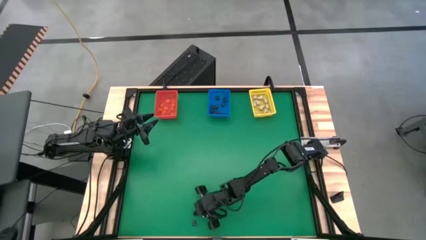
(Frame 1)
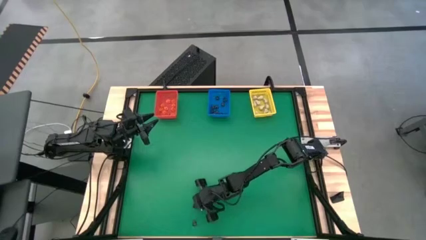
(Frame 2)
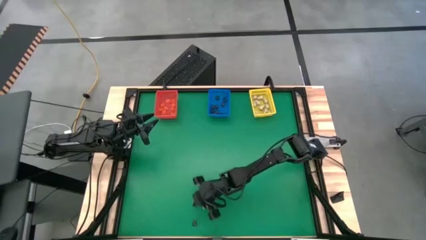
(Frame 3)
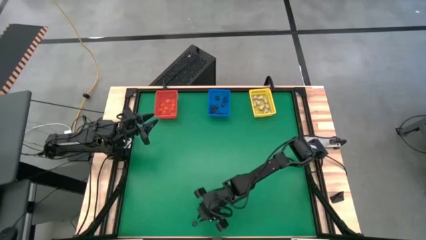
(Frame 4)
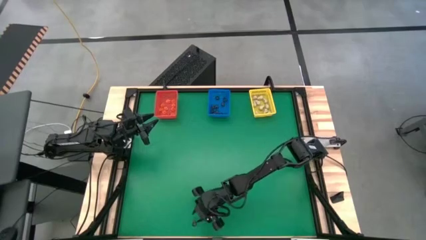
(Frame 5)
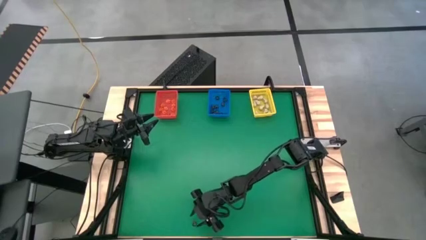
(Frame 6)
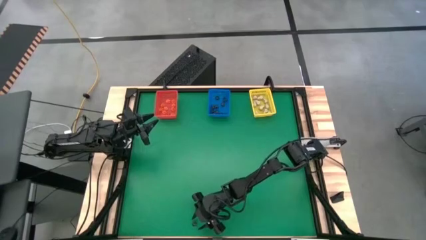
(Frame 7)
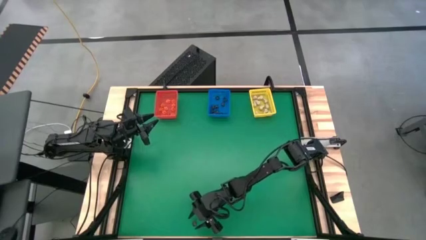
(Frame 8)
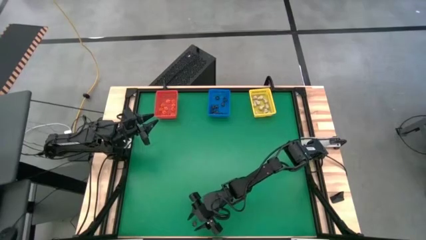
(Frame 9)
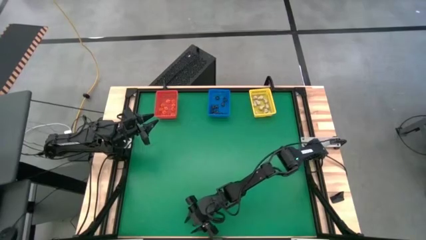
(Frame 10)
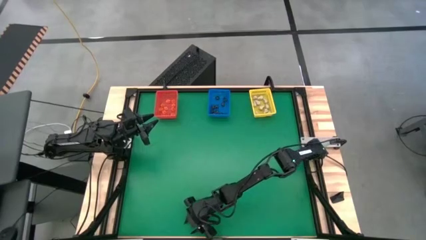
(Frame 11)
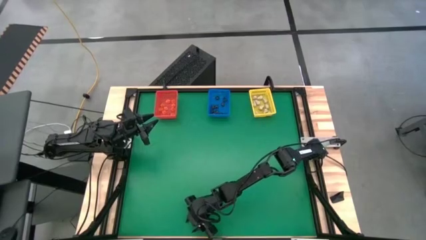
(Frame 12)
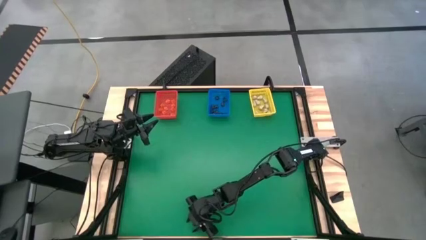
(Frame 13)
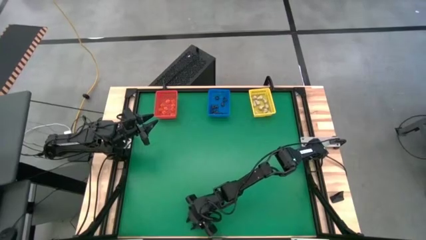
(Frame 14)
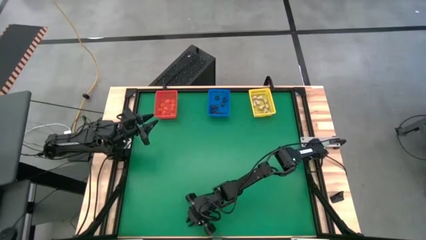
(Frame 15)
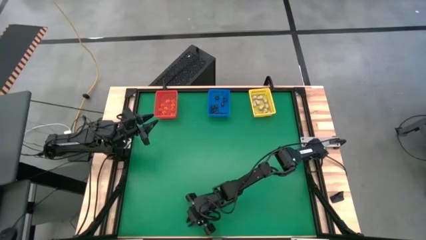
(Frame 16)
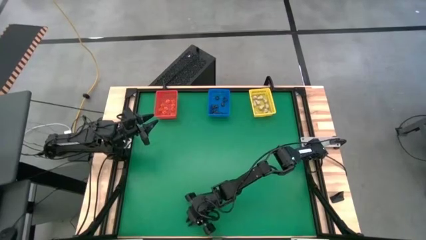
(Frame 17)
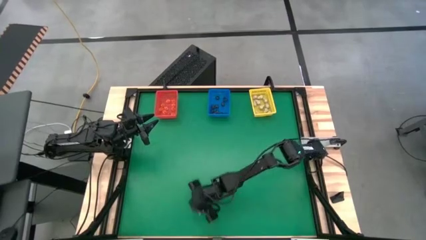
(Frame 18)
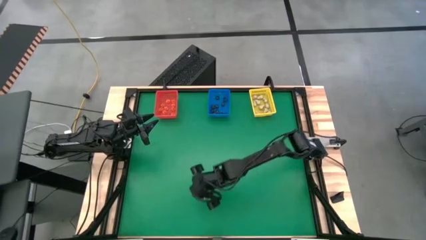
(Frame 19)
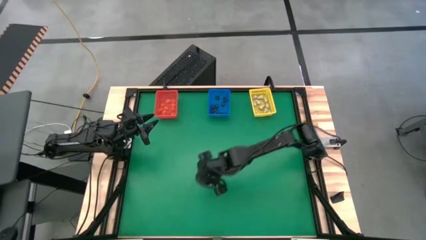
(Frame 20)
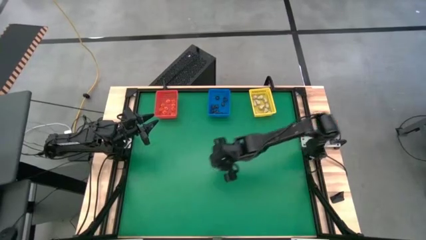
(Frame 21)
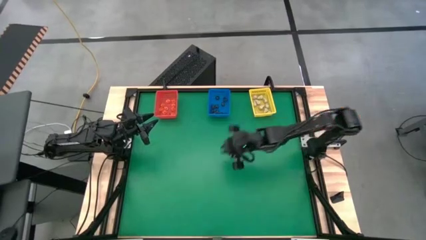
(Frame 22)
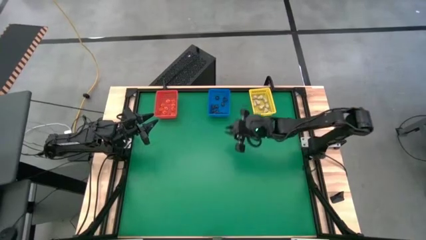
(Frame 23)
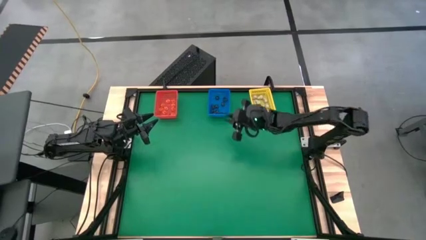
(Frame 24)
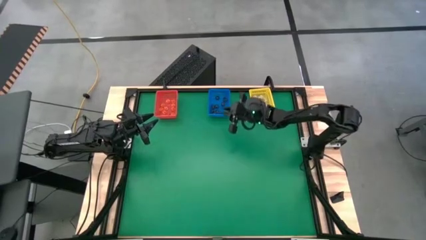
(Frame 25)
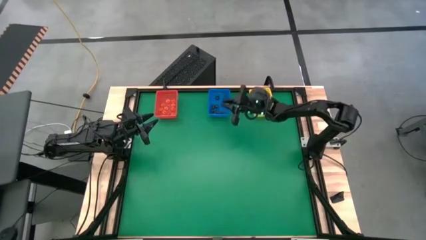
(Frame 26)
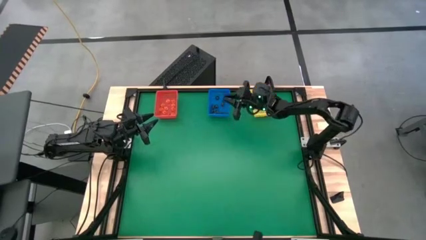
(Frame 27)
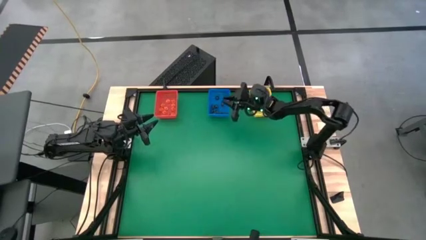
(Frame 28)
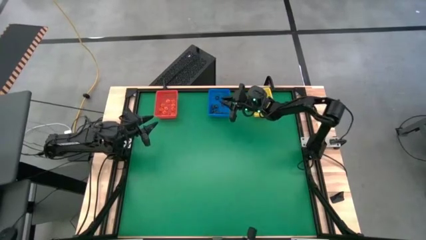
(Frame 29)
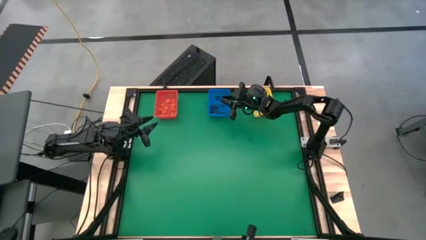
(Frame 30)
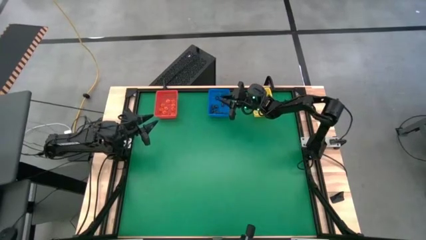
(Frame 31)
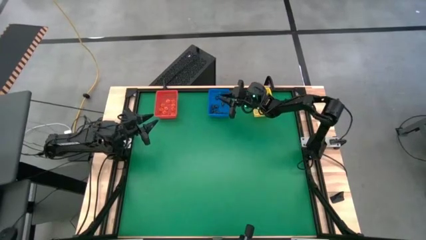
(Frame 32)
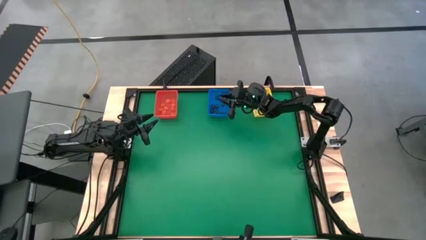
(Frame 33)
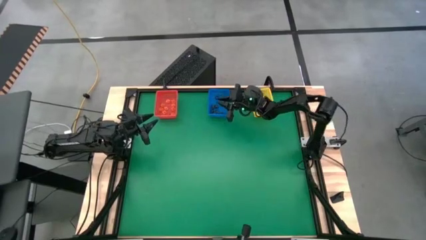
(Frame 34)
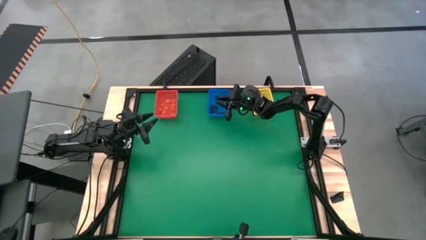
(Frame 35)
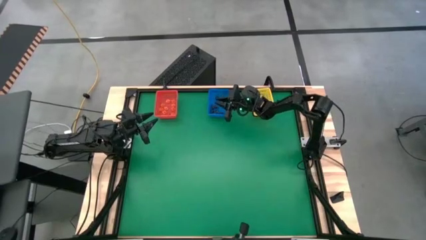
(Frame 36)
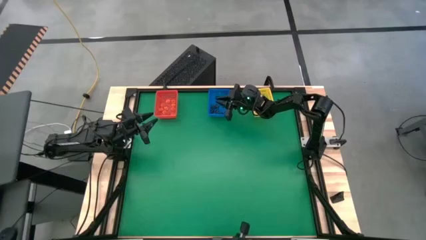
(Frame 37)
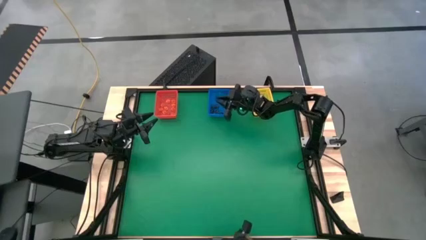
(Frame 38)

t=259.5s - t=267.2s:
Task: Sort Halloween decoration
Put the black skull toy into the blue bin

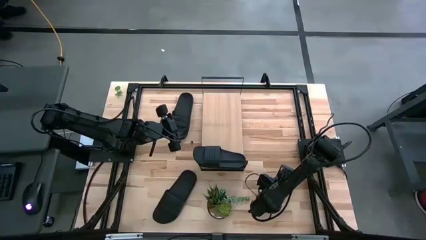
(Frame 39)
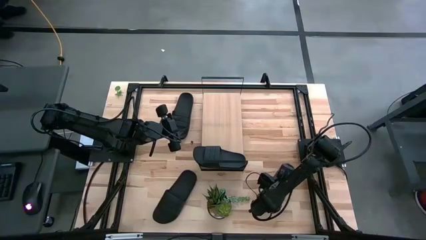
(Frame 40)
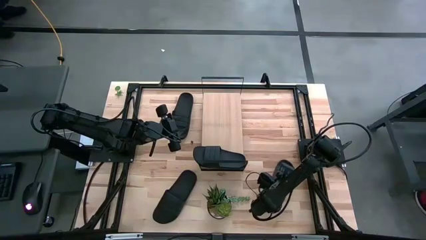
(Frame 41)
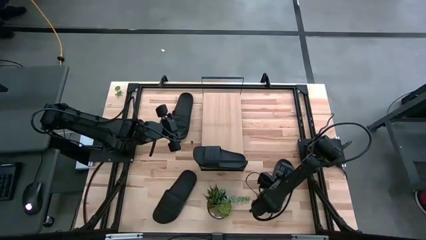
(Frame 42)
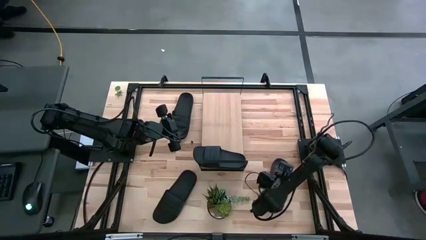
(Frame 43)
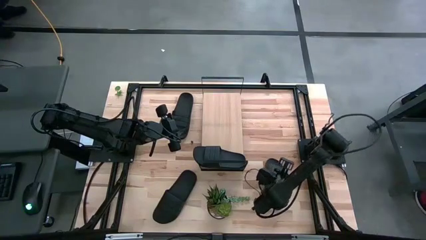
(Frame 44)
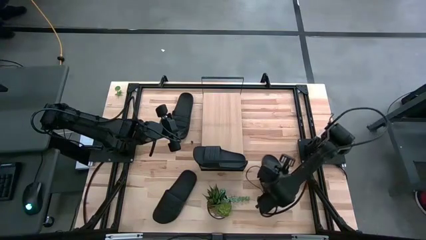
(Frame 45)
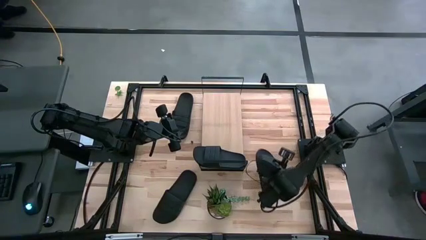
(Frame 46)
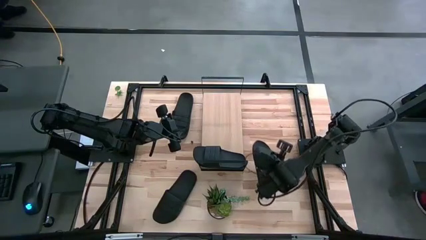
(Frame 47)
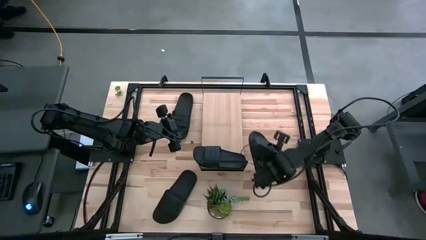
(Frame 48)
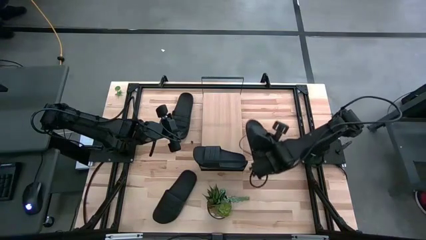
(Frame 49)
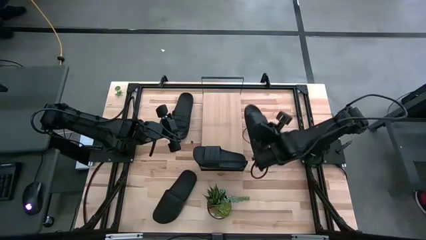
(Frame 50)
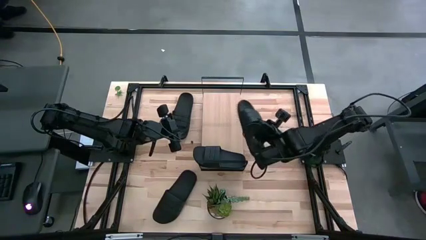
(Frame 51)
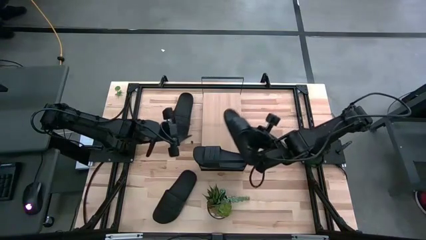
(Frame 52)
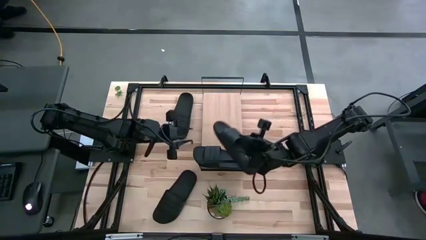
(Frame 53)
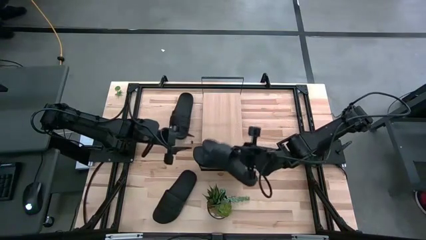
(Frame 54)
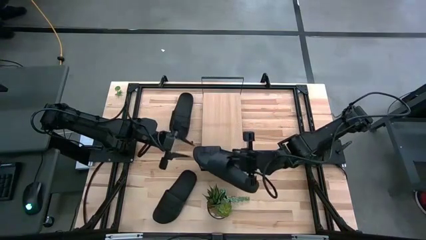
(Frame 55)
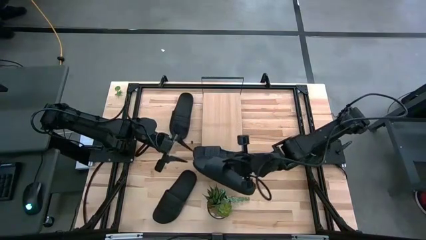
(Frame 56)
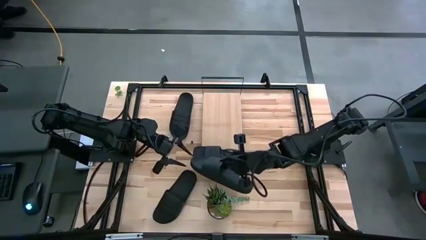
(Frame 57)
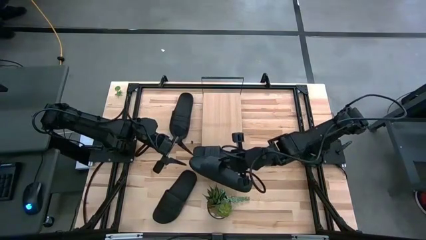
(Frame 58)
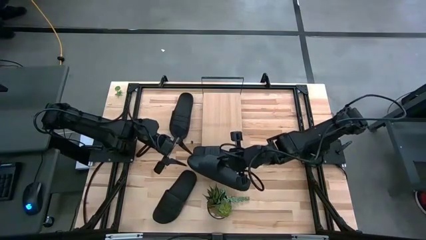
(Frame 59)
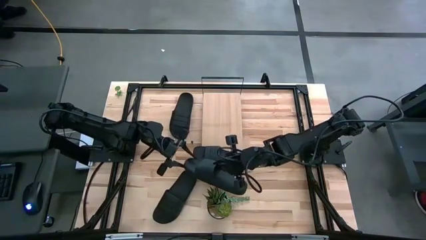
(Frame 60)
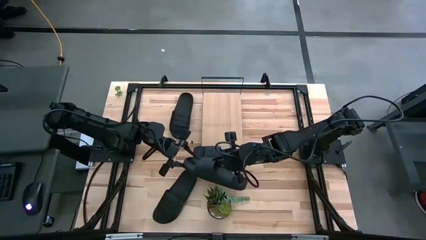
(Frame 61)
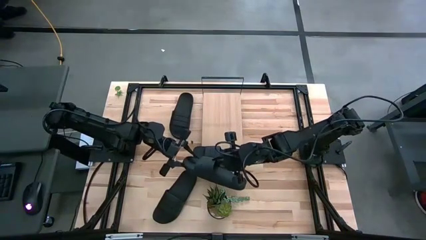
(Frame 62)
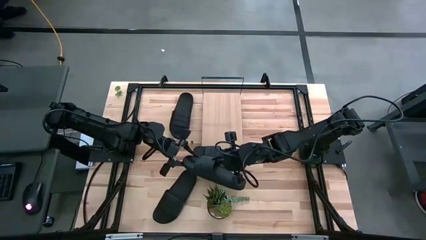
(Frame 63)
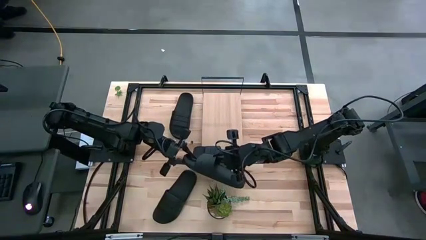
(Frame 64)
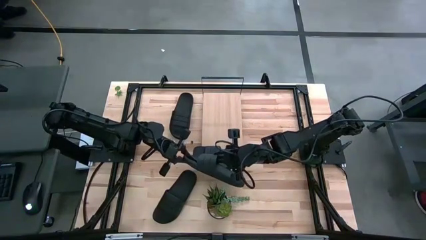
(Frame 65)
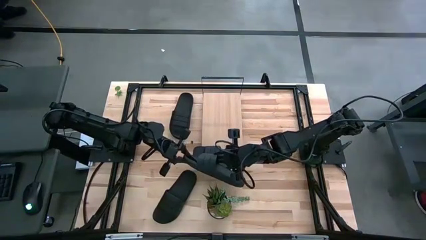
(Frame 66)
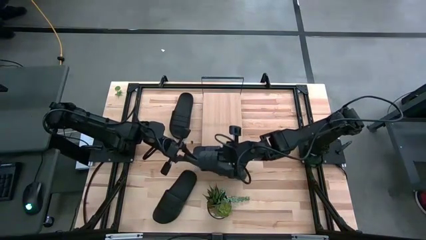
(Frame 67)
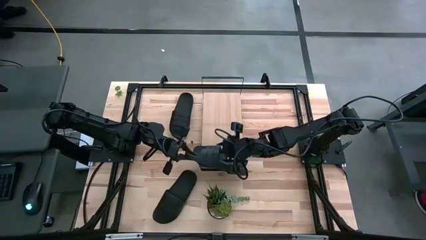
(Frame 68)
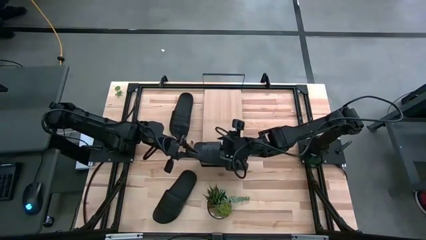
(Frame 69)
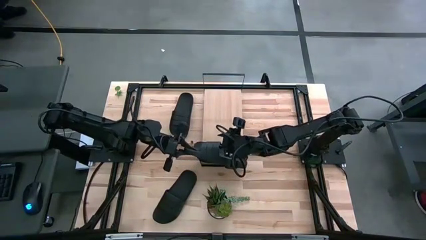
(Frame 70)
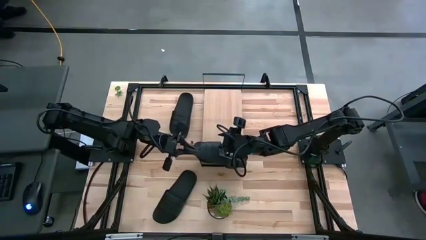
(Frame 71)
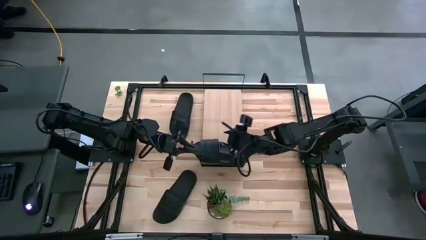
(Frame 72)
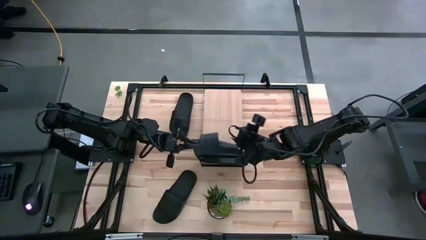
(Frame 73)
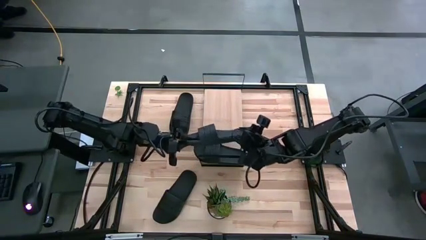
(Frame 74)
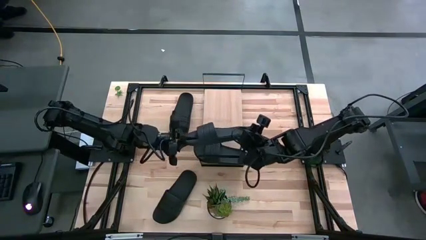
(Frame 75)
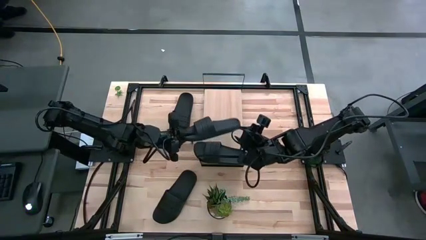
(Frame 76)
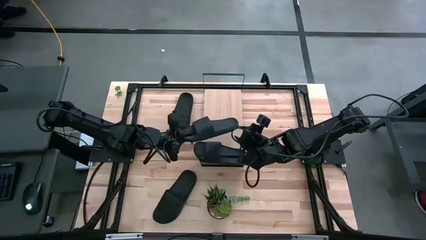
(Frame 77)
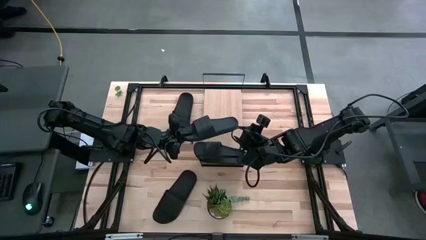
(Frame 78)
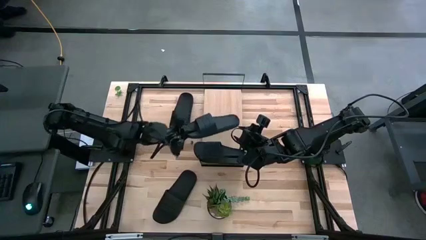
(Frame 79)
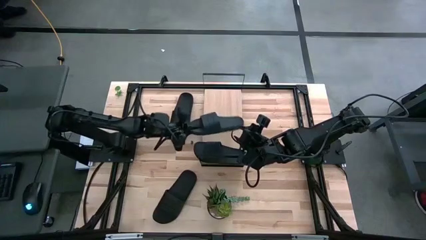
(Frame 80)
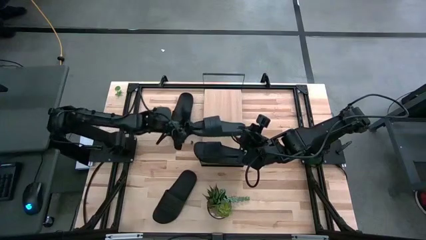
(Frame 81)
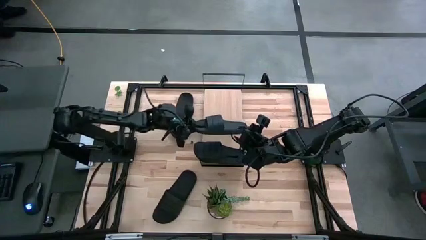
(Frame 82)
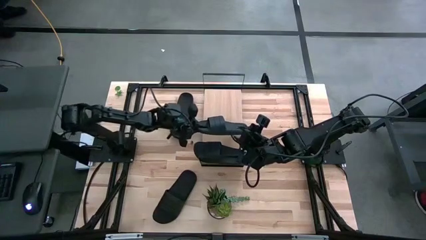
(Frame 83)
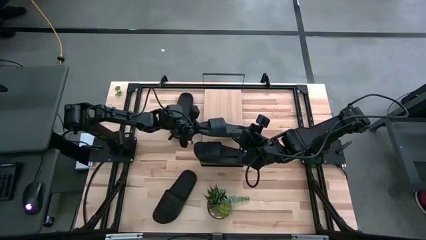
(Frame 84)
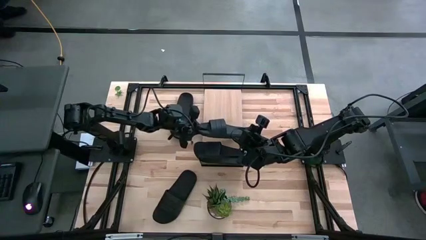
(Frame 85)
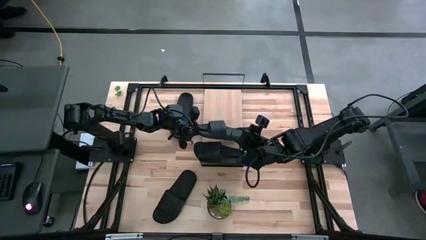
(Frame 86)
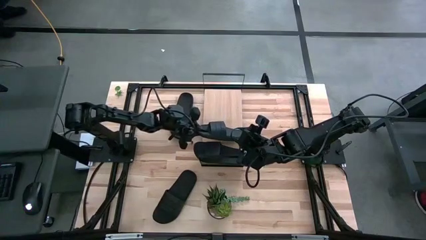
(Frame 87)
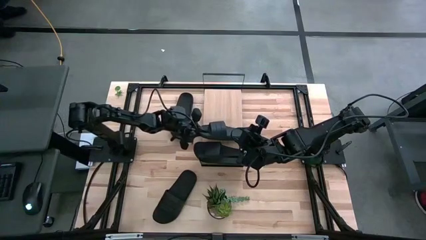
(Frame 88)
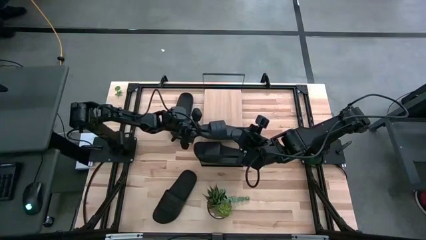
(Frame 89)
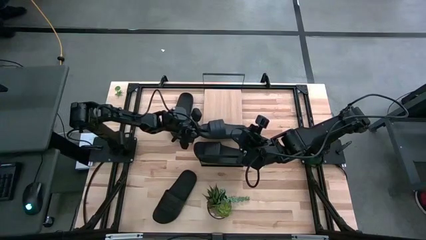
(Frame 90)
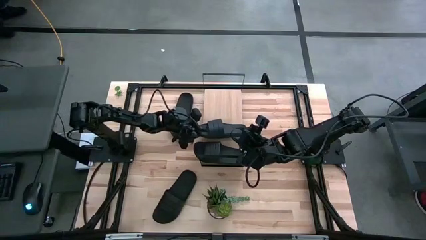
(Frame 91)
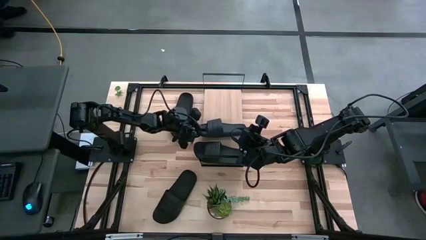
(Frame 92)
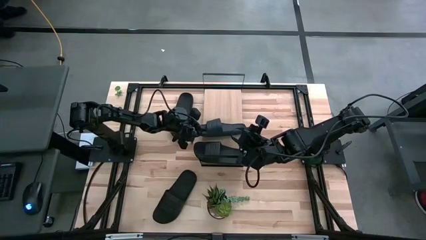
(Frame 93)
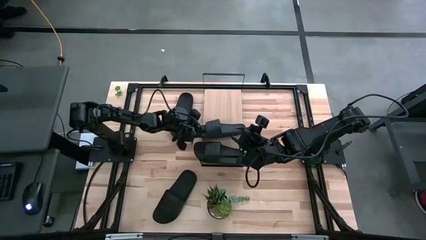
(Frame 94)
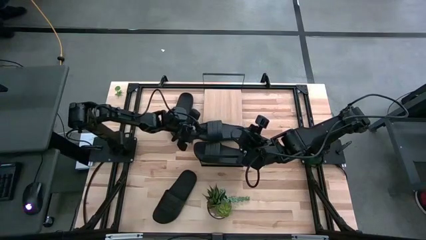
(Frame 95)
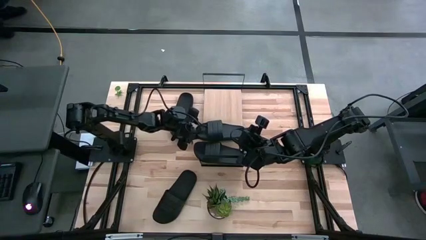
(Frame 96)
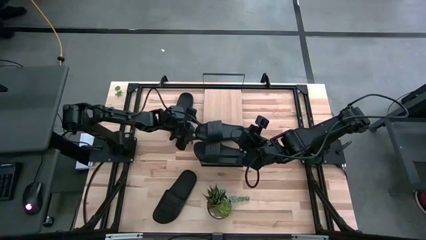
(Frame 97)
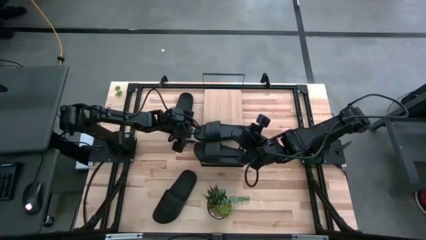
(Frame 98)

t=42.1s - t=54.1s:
Task: Pick and place slides into the shelf
Put the bottom right black slide on the shelf
